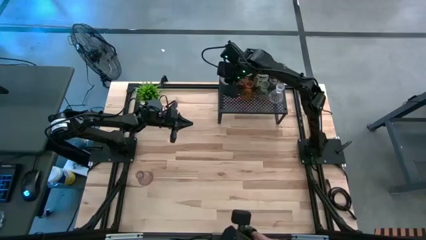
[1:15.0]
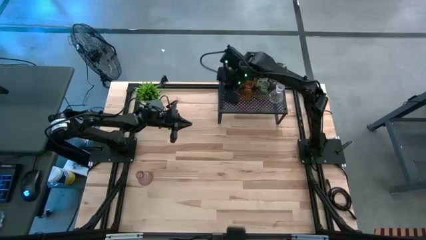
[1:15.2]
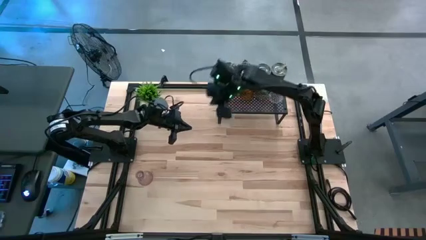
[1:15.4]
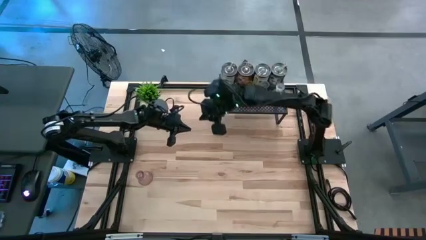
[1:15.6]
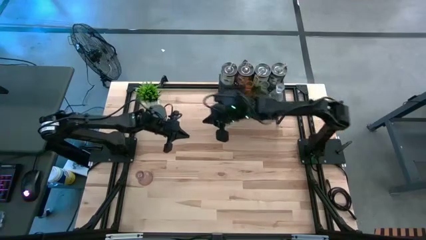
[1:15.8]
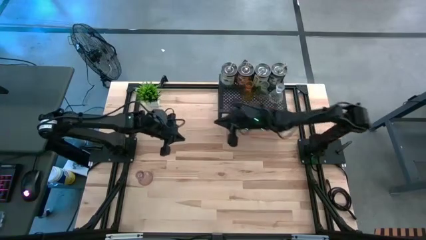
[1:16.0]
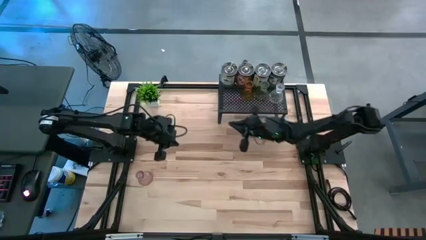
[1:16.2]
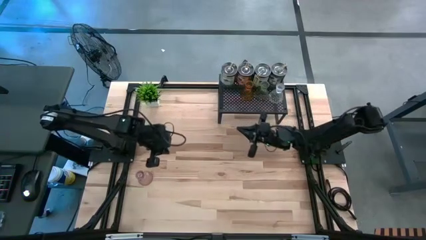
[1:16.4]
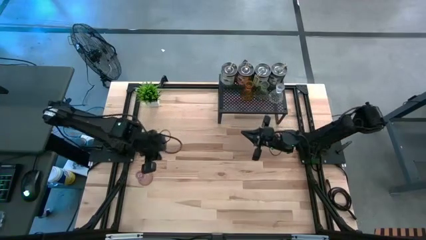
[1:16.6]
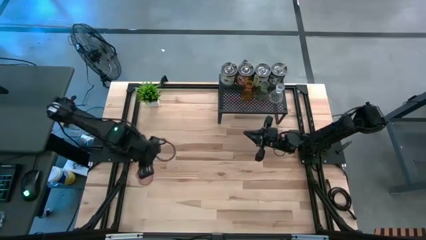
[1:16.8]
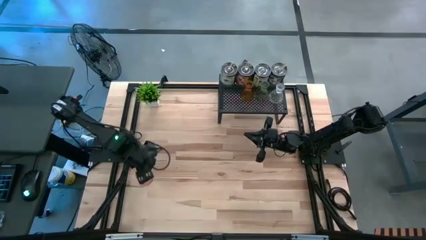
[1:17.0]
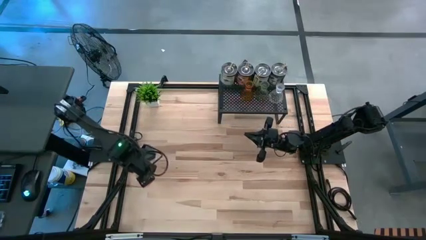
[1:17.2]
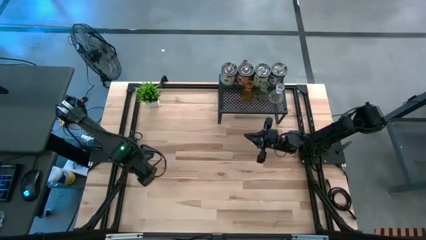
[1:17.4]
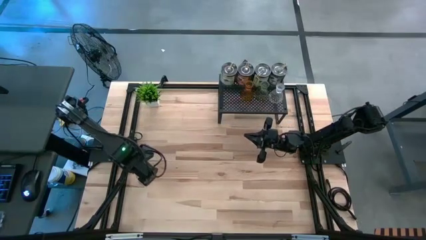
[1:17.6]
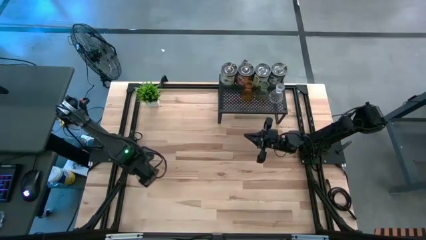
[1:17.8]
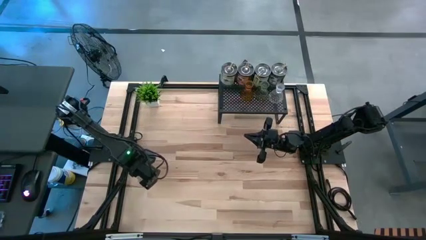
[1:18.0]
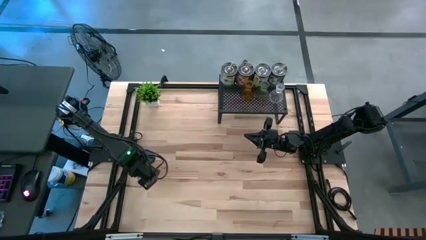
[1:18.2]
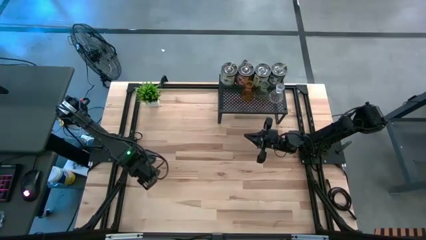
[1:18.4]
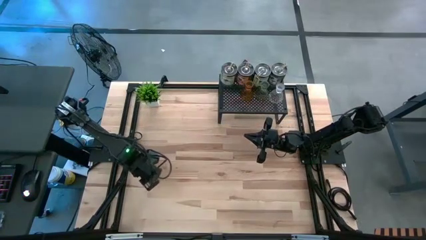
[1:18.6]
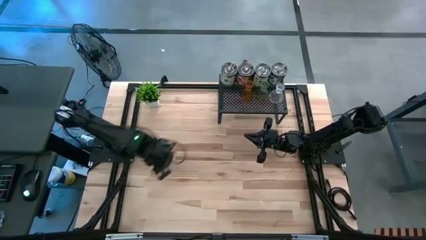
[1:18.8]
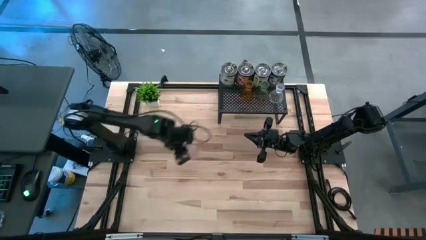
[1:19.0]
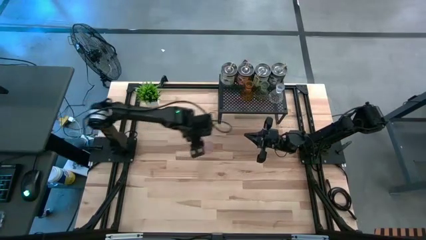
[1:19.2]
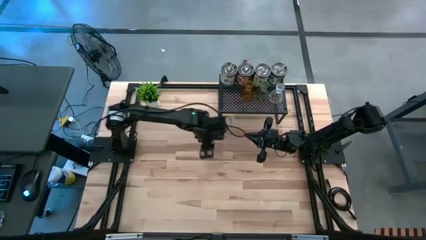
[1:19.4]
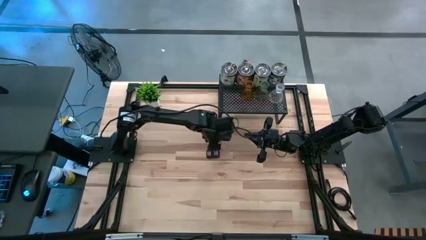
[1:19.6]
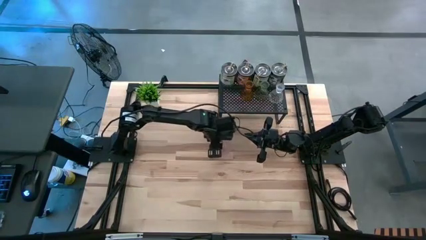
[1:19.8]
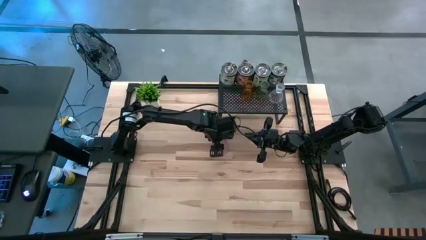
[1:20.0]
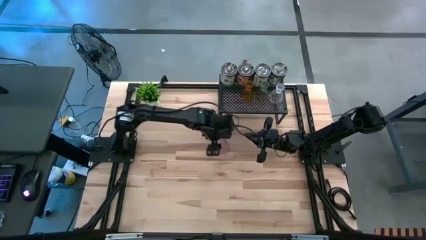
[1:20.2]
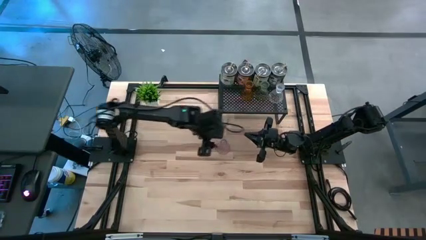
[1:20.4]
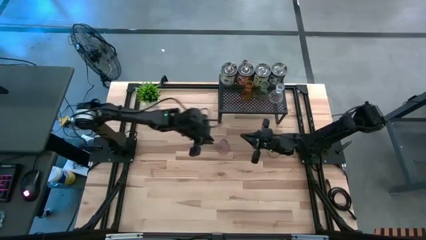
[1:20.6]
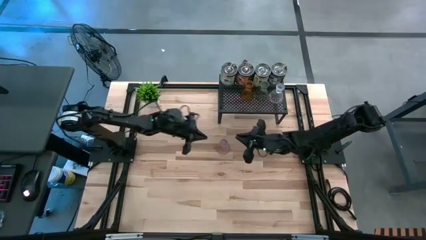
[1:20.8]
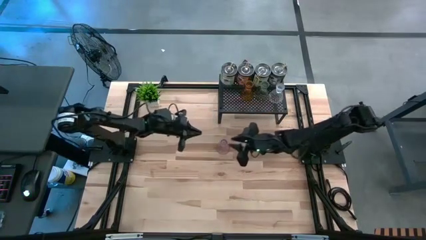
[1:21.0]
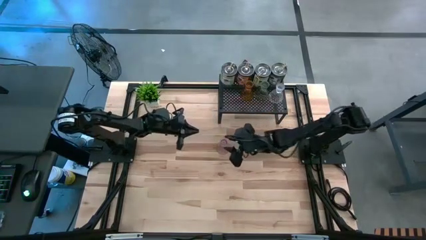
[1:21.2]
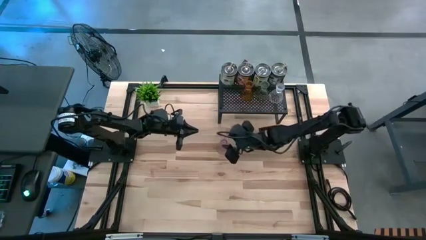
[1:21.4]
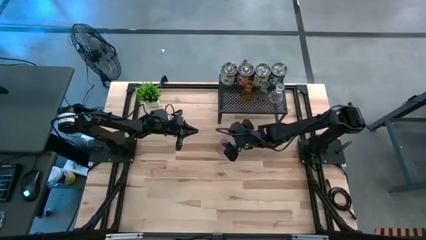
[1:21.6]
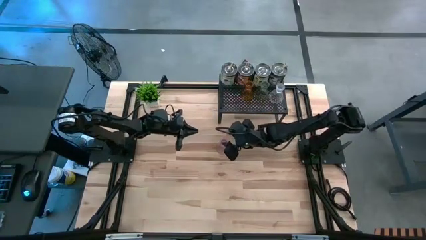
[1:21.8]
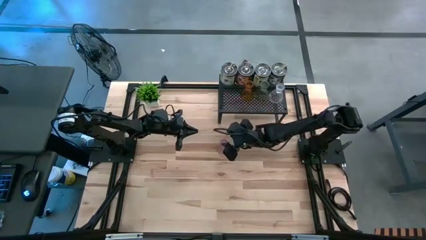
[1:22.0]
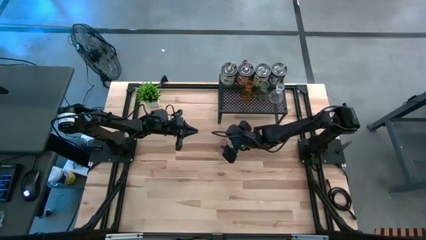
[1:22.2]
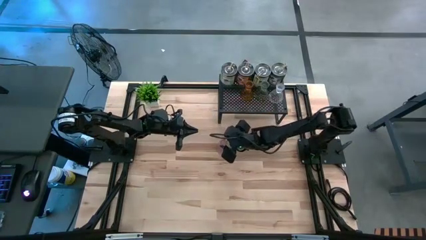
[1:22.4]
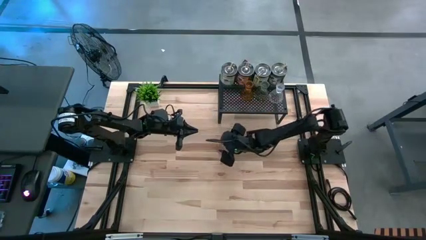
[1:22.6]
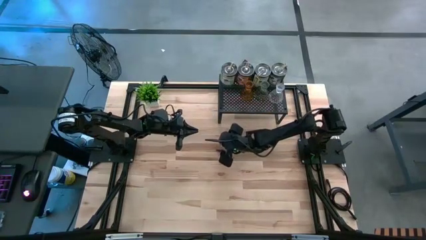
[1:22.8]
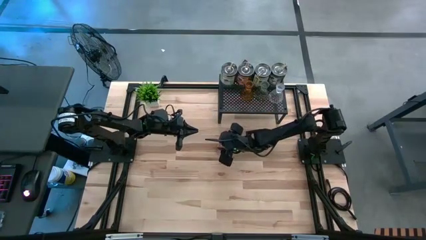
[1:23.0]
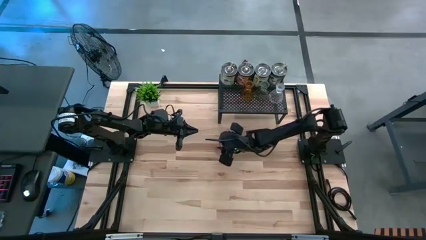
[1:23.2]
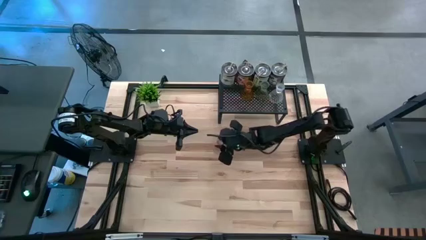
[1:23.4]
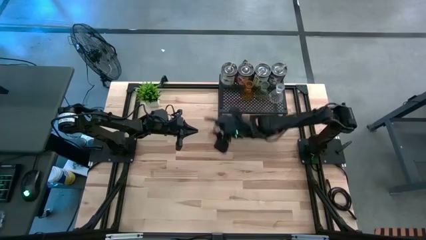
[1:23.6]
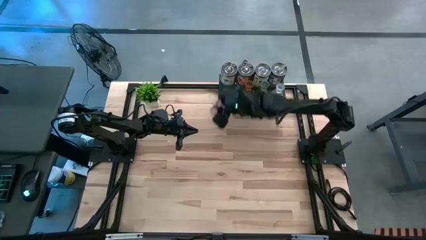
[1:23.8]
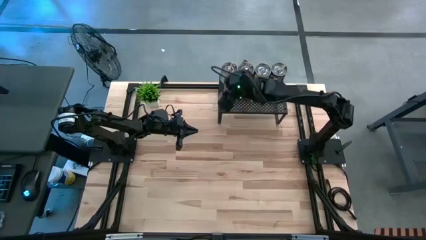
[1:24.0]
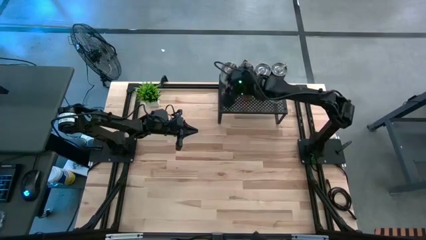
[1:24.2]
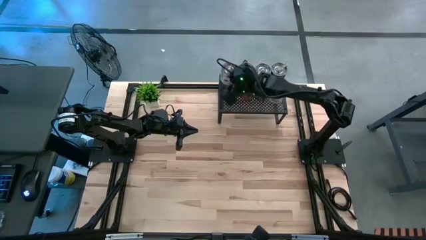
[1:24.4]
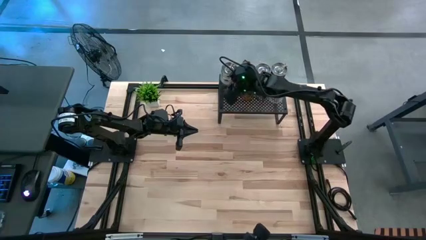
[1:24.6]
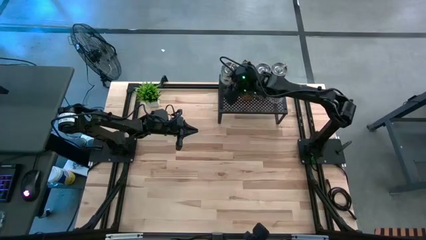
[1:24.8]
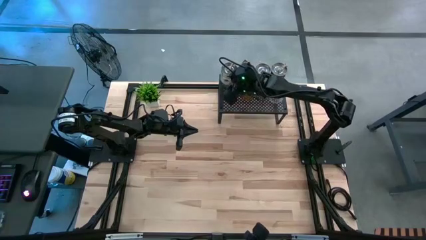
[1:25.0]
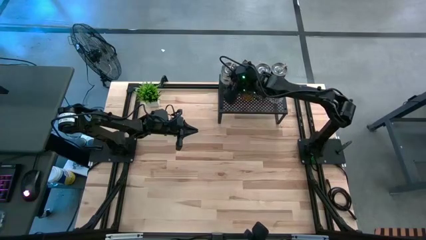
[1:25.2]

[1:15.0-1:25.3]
Task: Pick & Place candle stick holders
Put the pink candle holder on the shelf

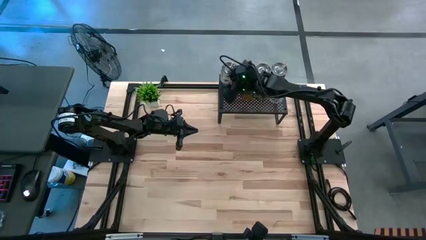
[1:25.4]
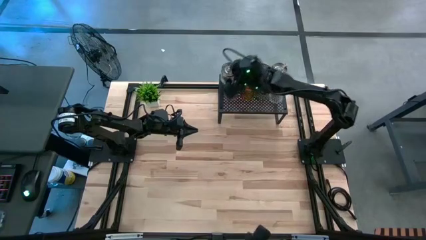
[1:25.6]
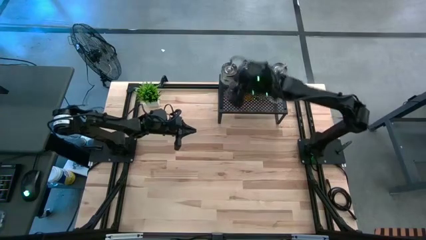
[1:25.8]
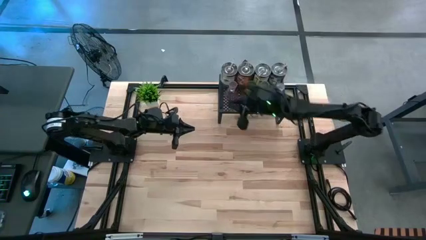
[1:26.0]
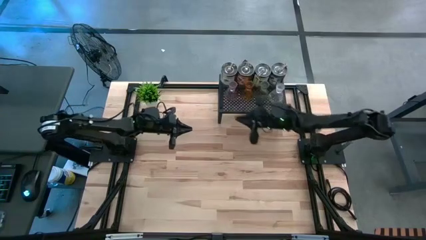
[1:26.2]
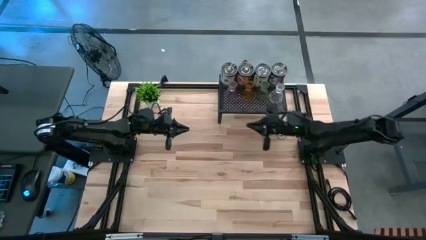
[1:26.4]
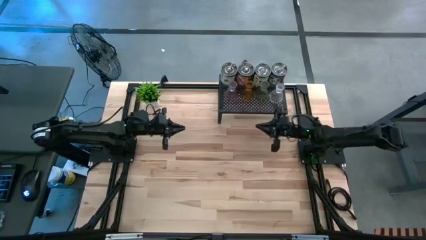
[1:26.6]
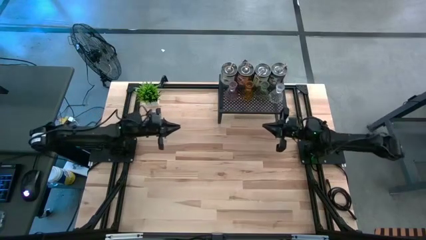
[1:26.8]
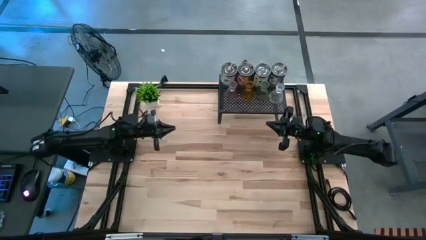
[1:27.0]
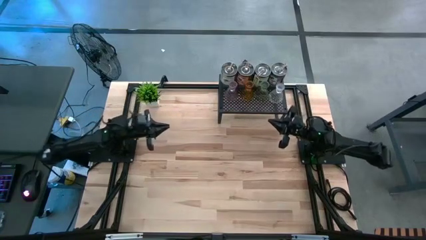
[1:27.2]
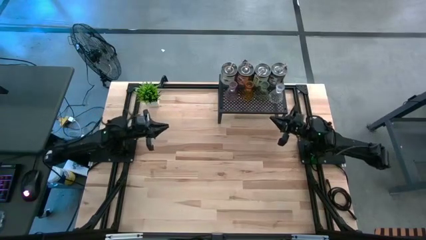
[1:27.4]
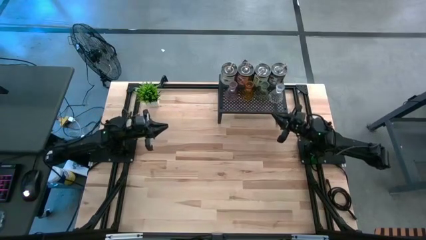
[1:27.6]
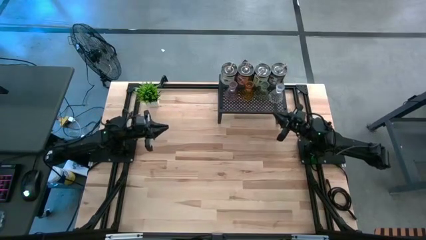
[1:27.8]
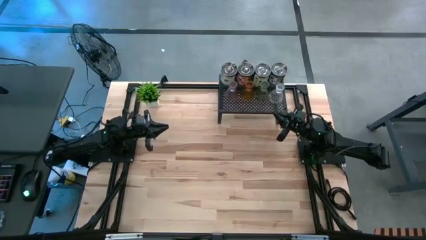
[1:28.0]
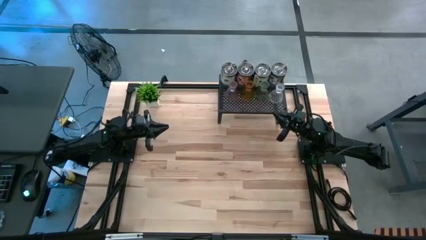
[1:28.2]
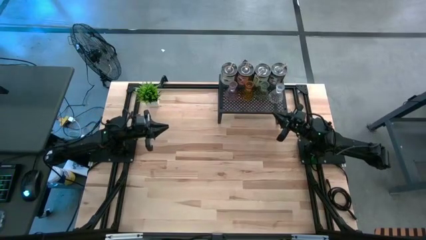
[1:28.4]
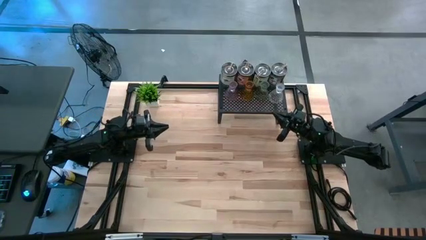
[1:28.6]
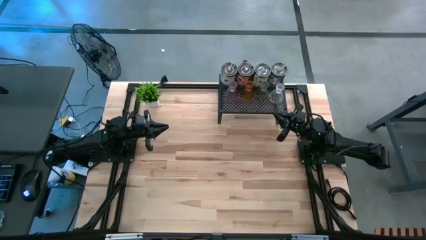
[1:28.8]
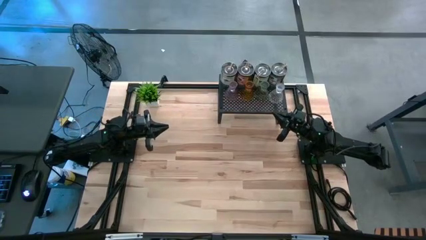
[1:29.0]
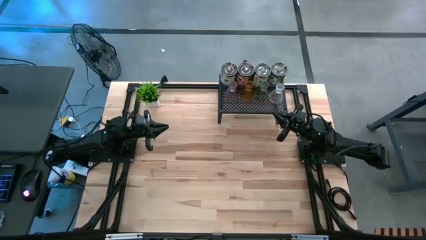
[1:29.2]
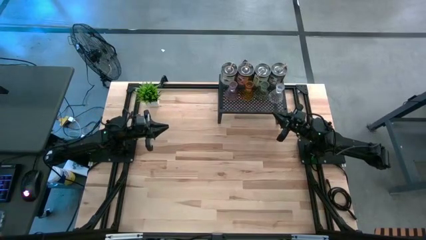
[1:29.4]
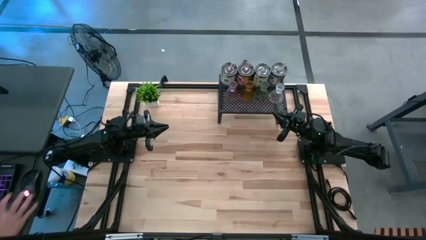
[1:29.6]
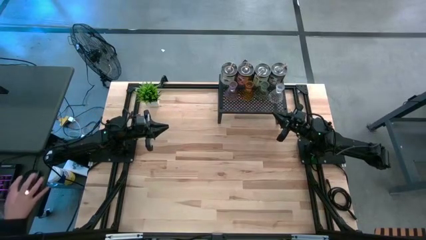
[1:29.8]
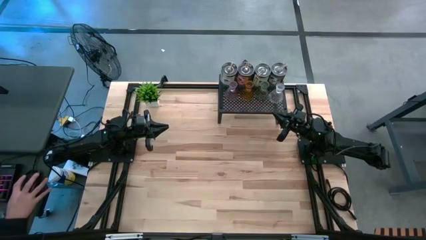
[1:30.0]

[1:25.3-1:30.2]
Return To Home Position

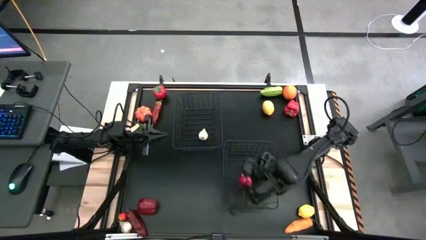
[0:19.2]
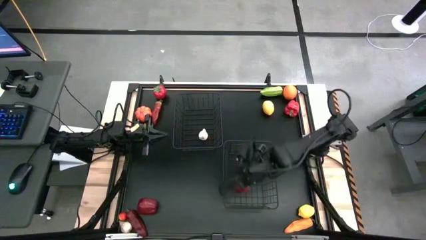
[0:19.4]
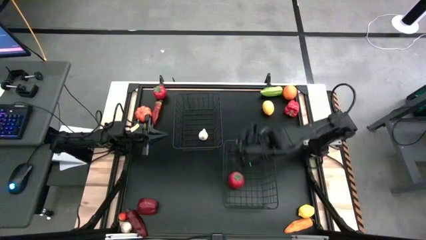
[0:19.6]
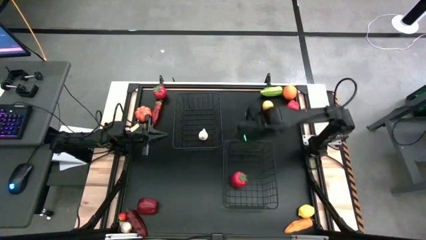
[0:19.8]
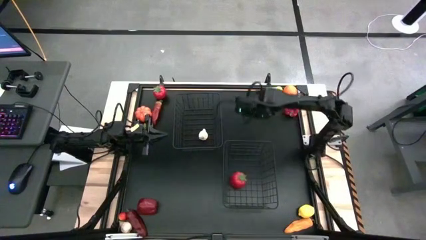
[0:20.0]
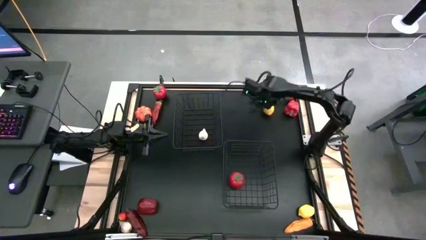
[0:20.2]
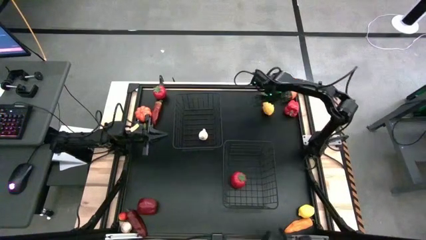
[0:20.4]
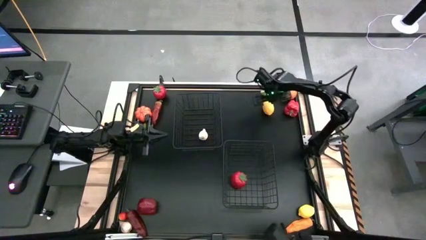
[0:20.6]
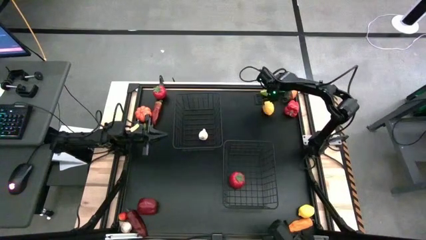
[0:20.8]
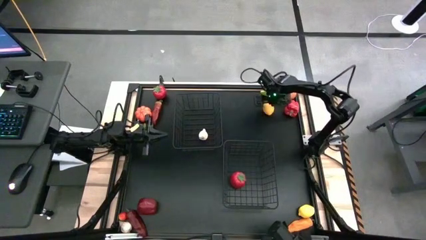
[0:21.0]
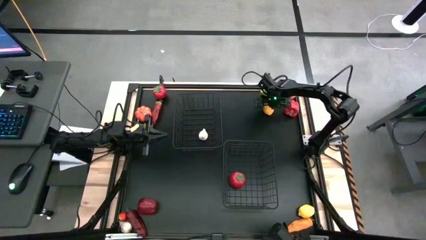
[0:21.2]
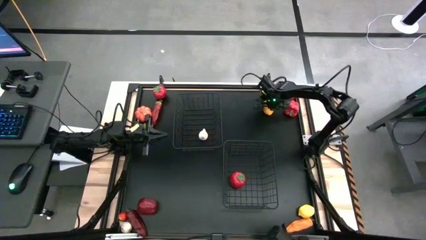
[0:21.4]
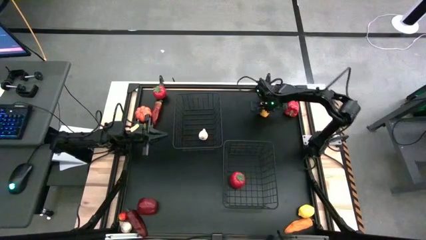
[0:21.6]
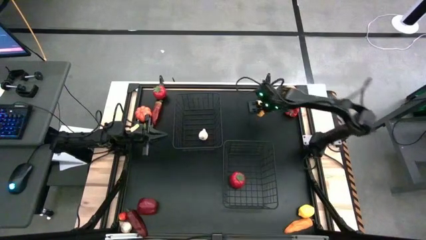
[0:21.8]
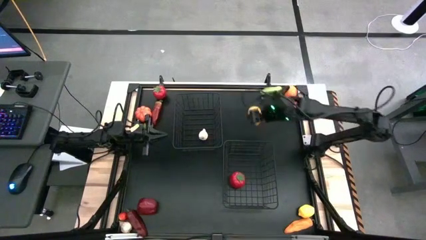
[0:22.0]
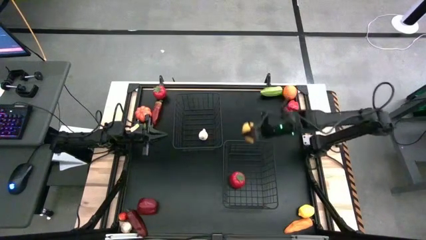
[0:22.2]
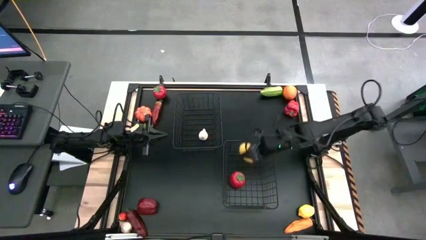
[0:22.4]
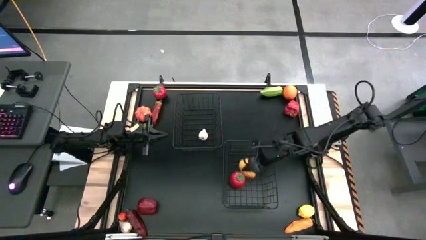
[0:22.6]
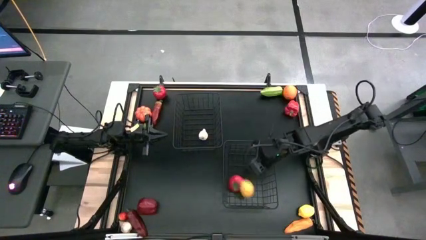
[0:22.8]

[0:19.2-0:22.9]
Task: Sort produce into baskets
Put the top yellow lemon into the bottom black wire basket
